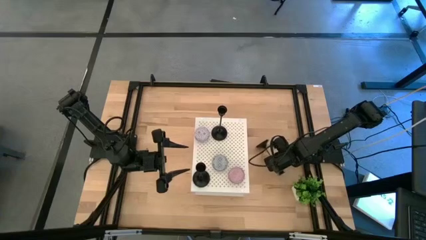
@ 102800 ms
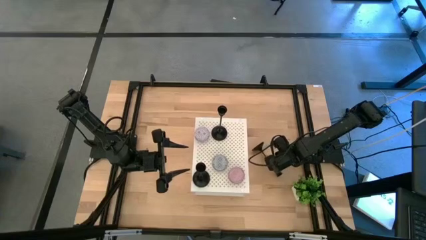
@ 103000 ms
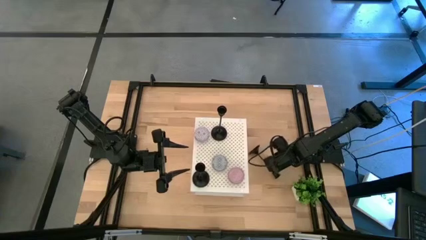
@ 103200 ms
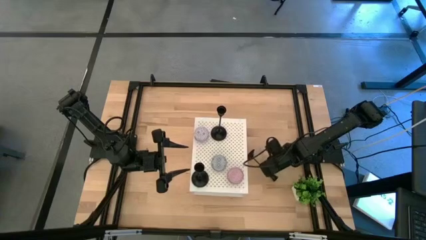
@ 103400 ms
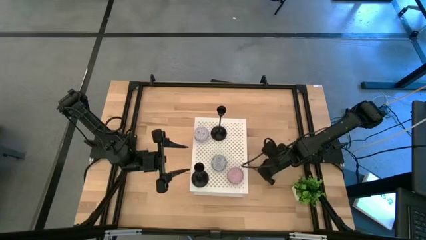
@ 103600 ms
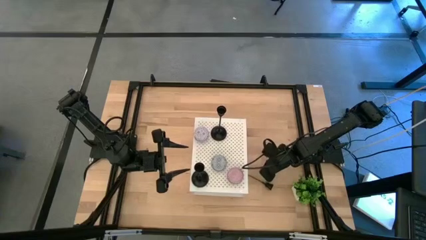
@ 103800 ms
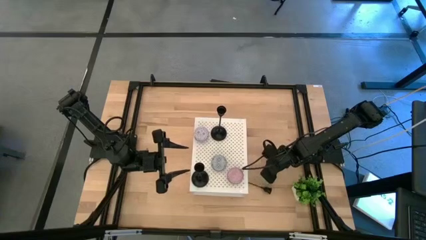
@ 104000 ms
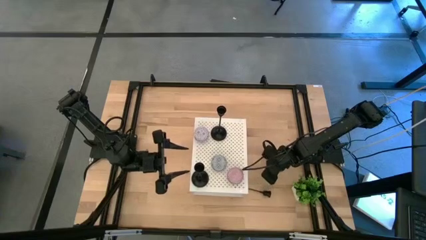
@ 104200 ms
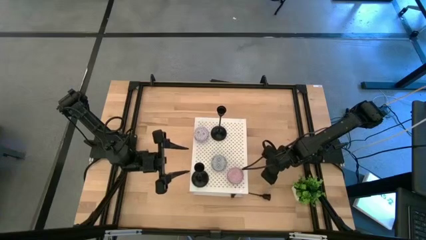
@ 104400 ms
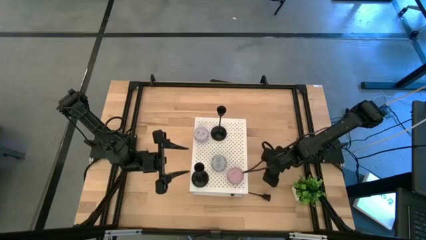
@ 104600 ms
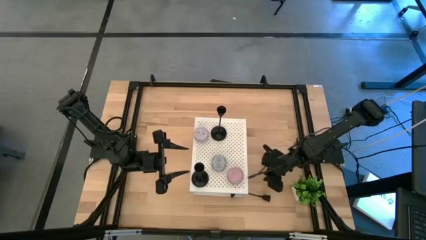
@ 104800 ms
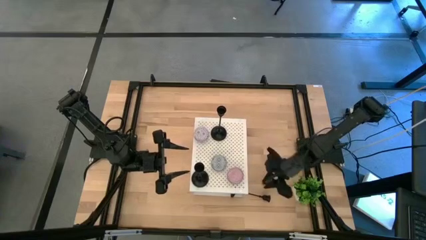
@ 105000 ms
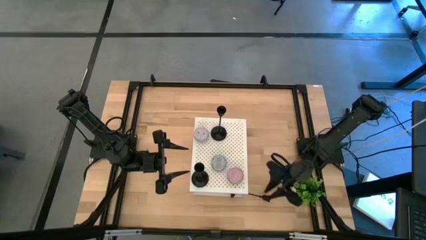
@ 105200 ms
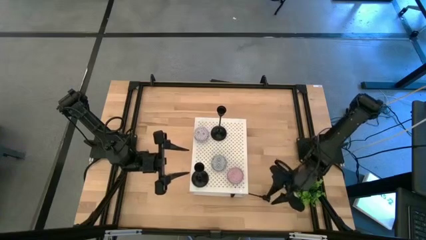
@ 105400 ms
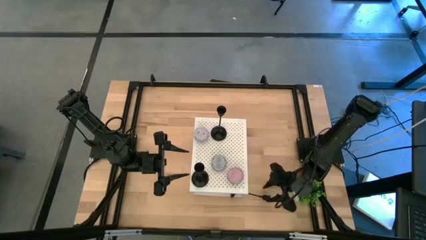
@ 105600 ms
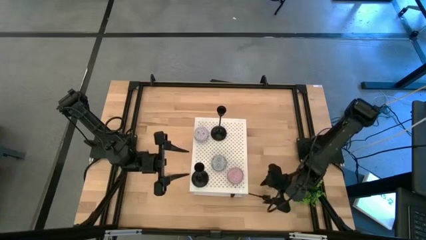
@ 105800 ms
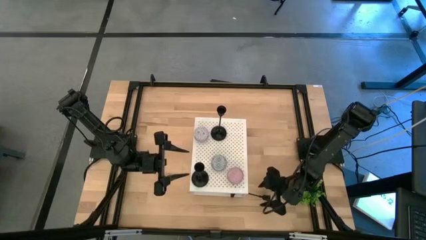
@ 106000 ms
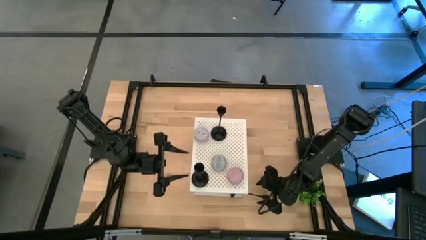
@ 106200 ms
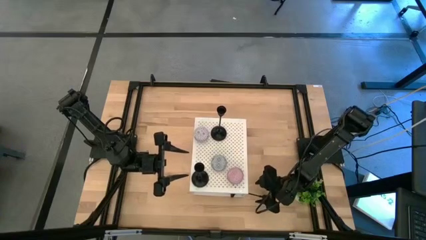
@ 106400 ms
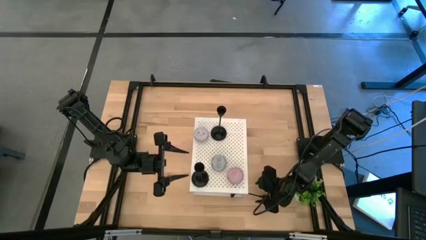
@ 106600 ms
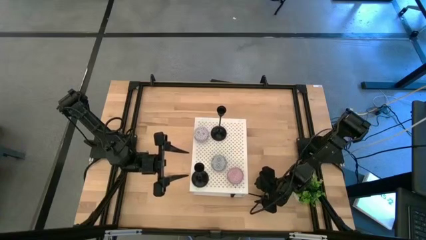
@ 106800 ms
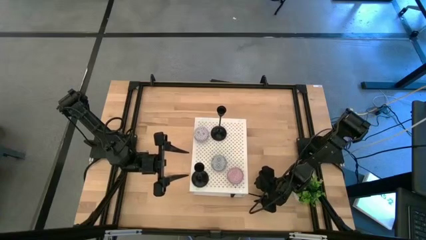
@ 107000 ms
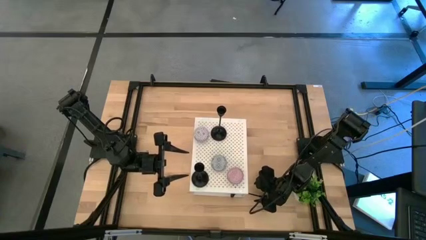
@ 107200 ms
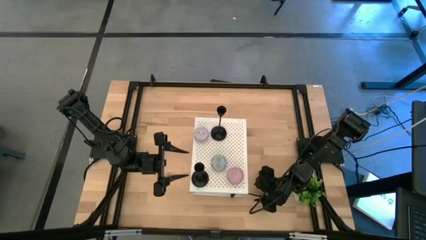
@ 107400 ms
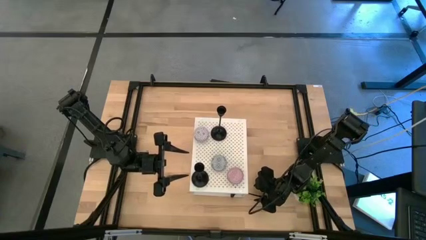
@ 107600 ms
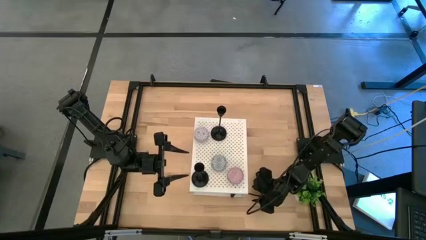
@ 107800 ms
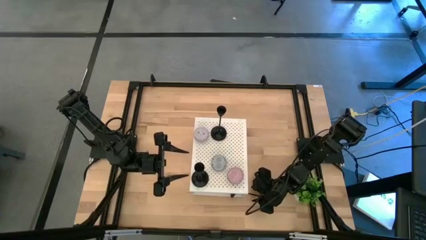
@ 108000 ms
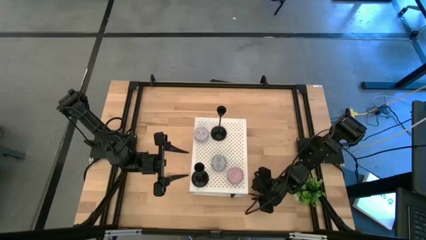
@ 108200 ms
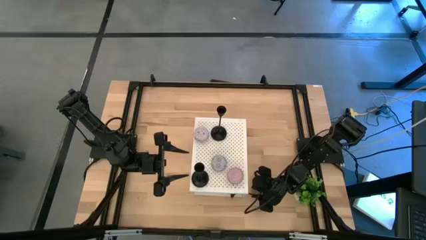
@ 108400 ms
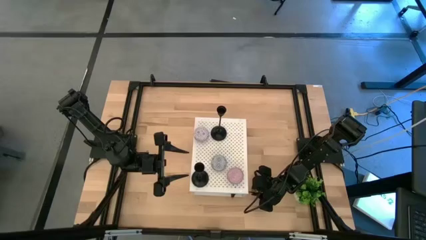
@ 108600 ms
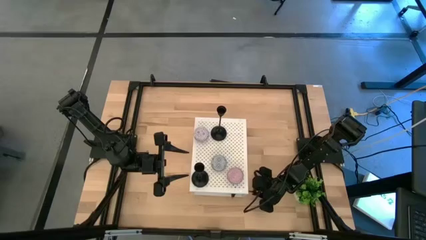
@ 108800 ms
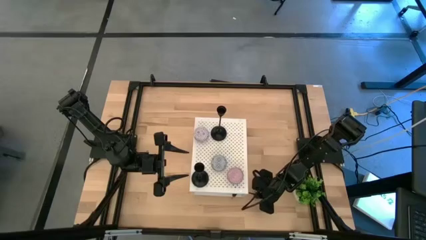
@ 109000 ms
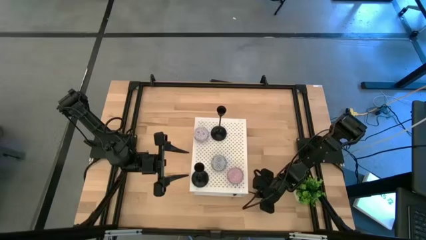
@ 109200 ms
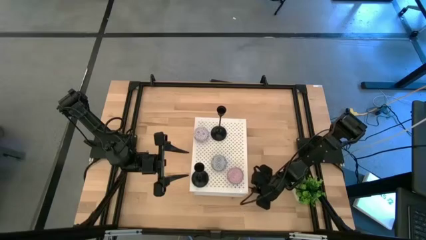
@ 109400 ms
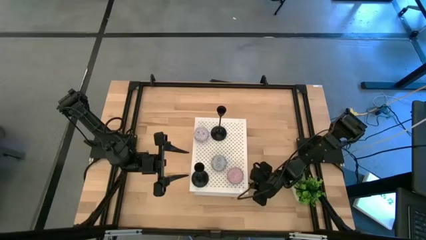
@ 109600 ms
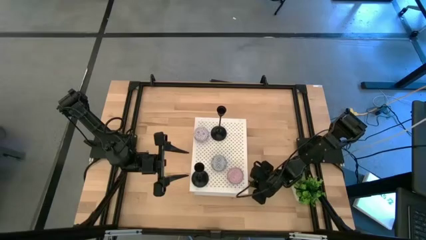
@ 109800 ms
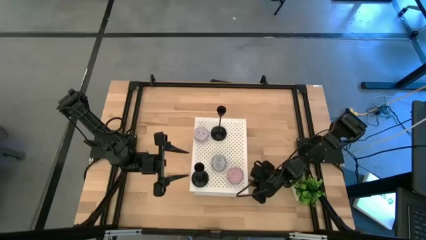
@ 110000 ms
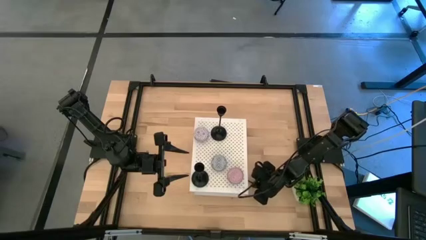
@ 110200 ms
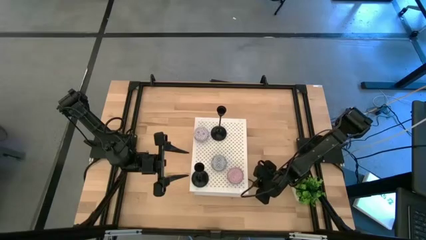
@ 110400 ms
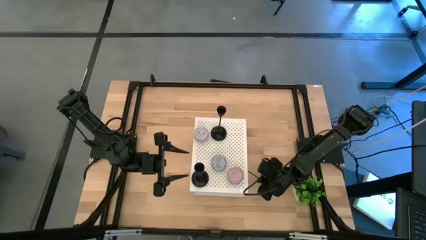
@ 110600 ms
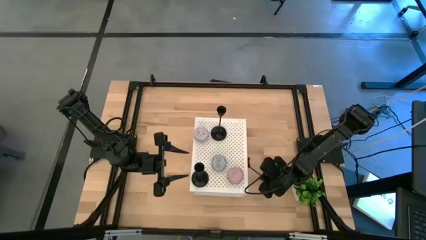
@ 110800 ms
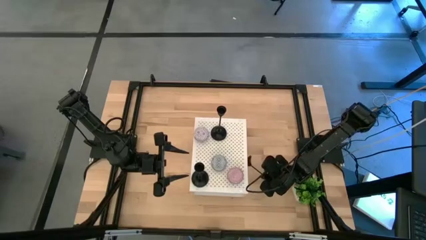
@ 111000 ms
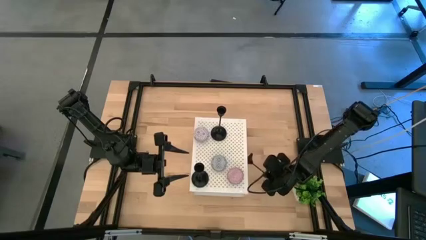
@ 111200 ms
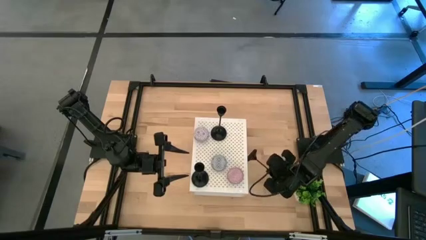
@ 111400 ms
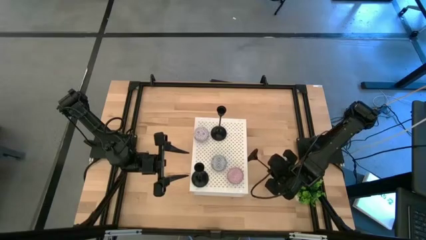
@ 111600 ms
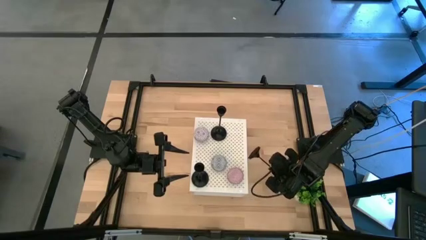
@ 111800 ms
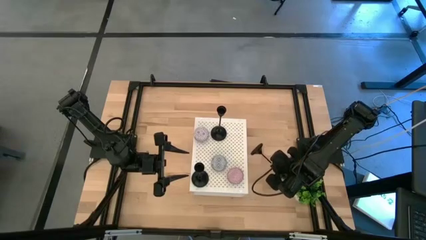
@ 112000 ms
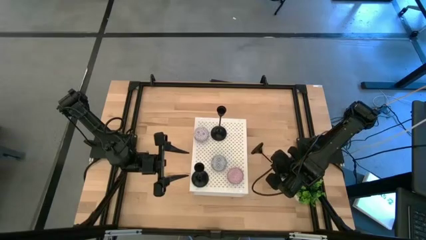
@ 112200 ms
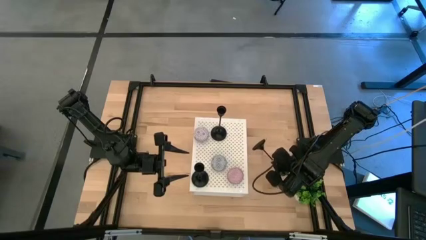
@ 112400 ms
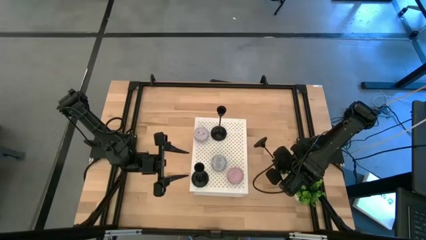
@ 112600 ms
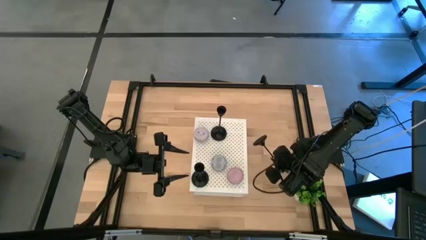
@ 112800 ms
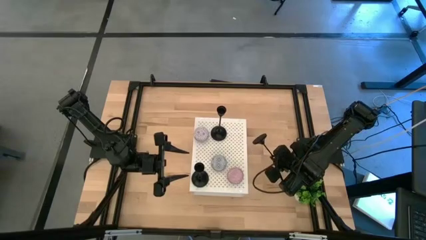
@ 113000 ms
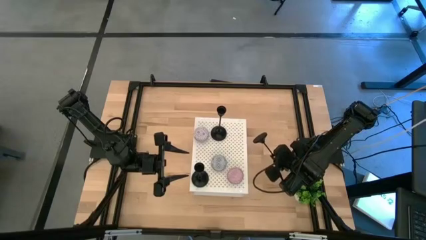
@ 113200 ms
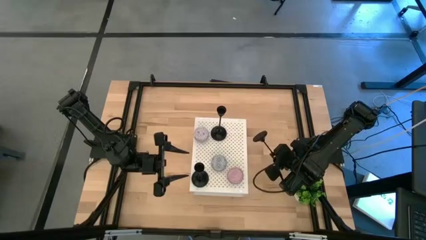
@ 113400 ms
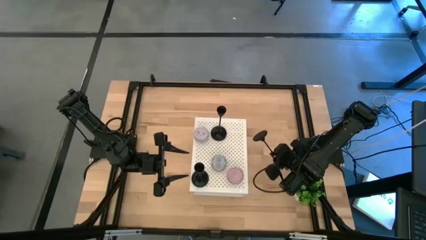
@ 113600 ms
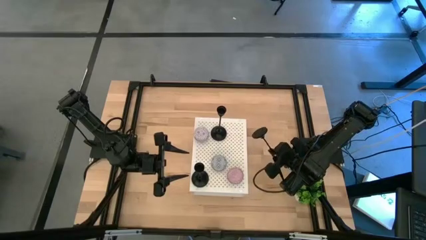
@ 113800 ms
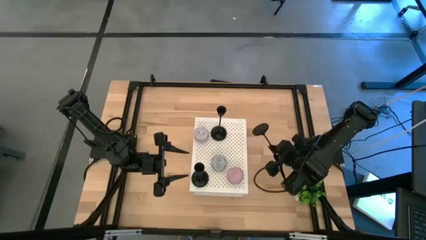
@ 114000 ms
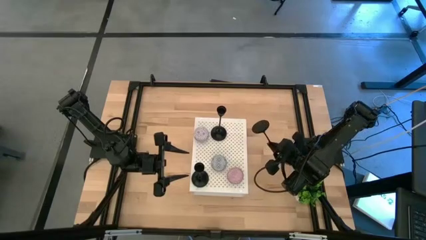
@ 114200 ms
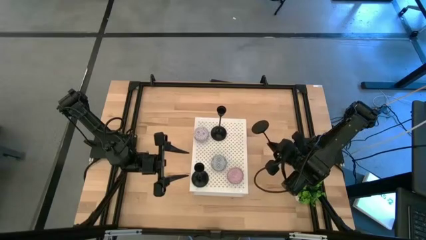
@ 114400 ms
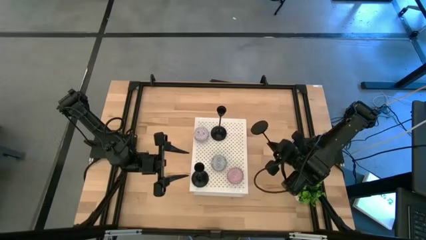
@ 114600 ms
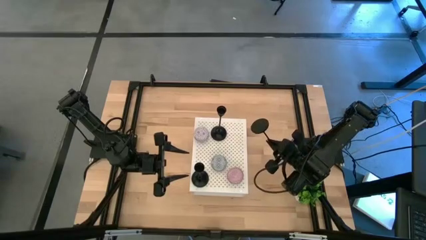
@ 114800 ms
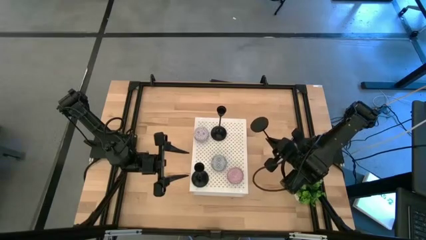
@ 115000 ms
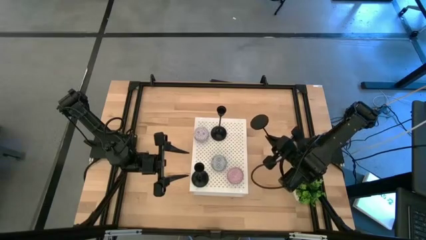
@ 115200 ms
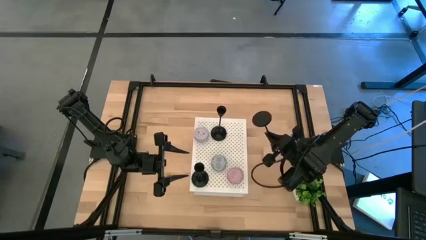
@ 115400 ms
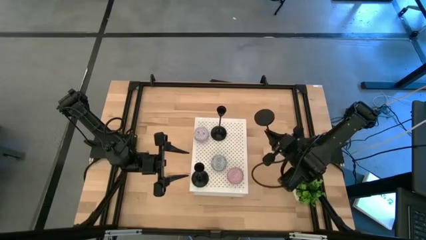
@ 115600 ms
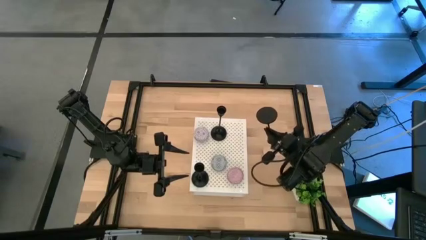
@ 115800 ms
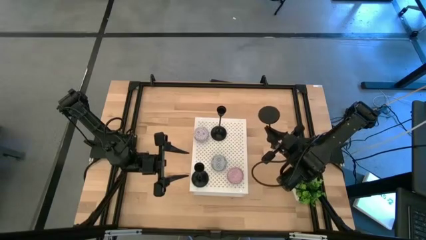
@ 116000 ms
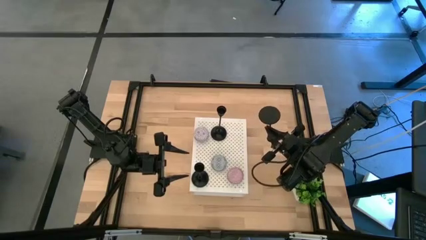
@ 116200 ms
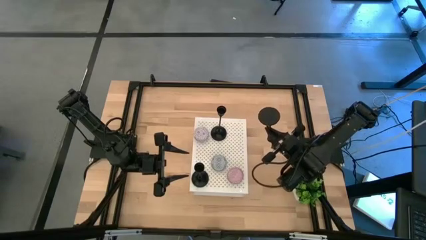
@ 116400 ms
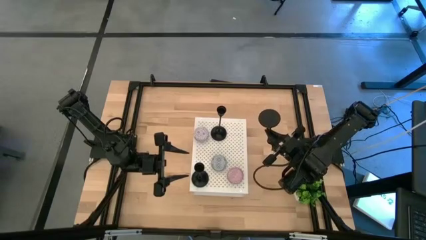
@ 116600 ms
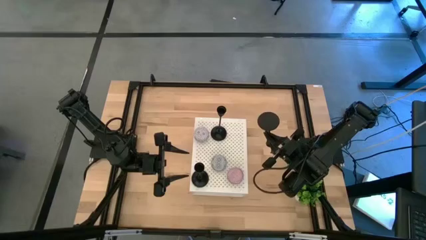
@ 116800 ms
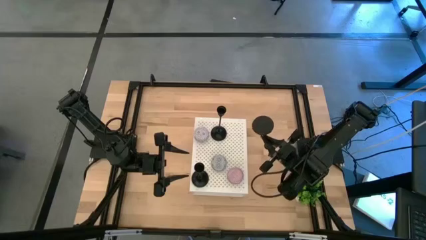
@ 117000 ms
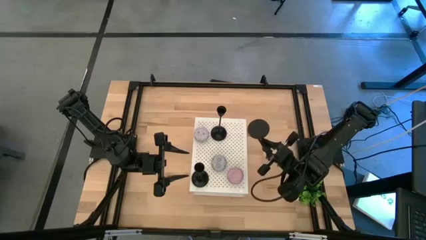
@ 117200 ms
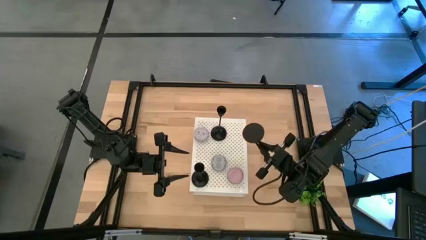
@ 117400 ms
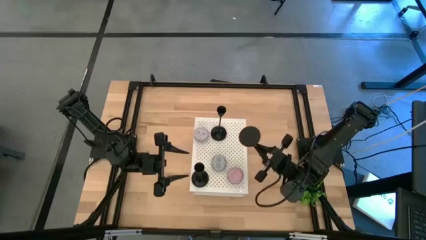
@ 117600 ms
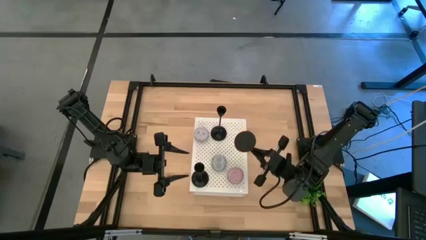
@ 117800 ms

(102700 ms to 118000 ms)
Task: Pick & Place candle stick holders
Put the candle holder on the shelf
